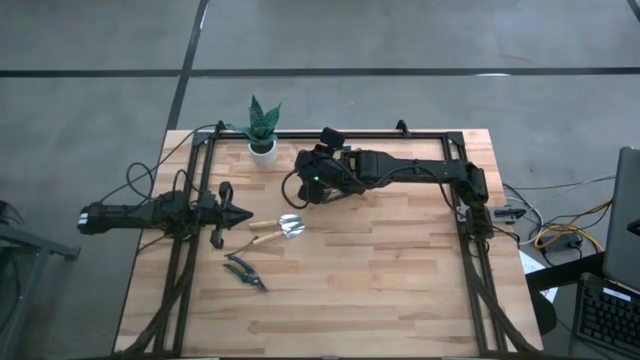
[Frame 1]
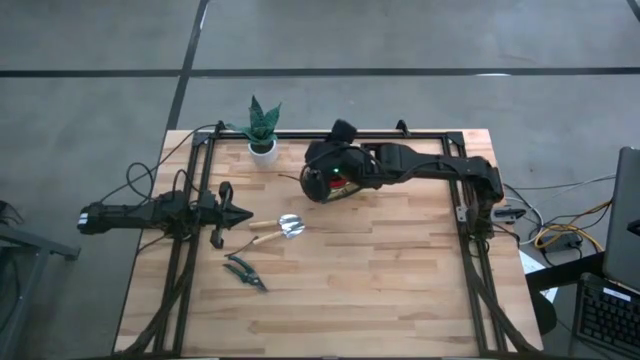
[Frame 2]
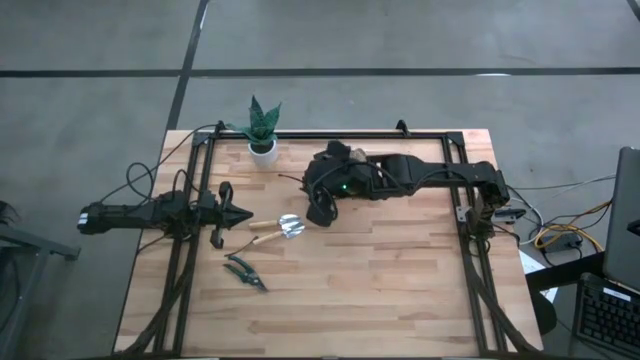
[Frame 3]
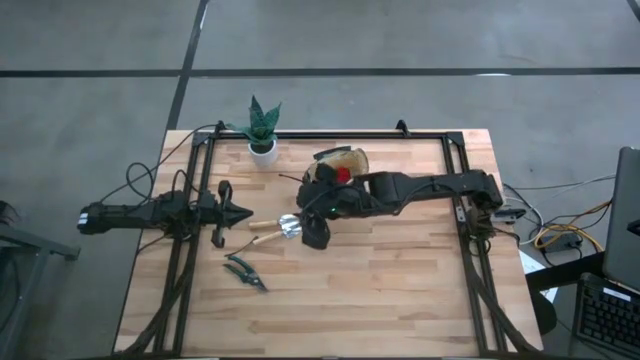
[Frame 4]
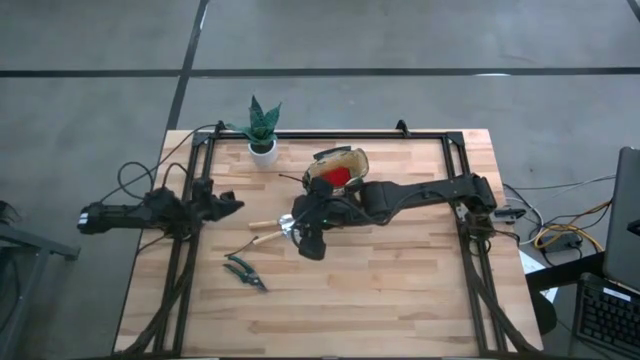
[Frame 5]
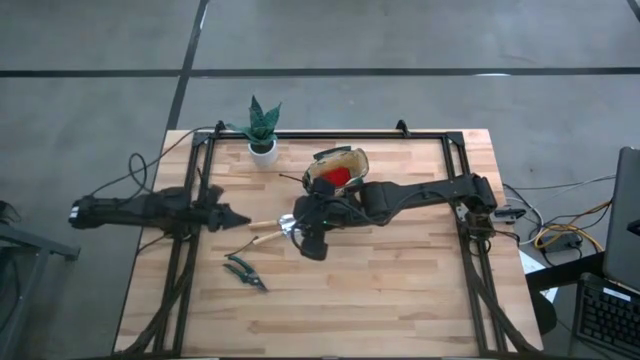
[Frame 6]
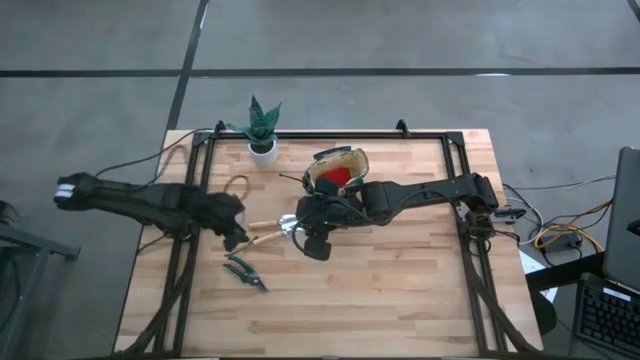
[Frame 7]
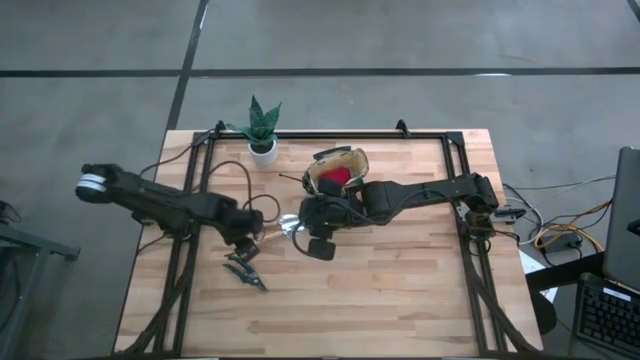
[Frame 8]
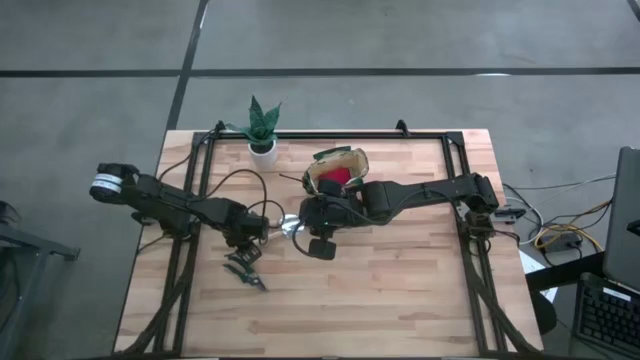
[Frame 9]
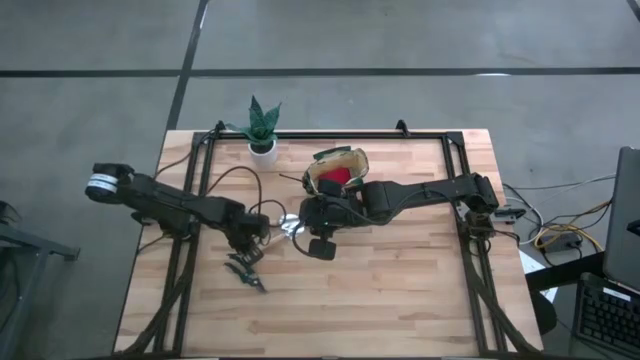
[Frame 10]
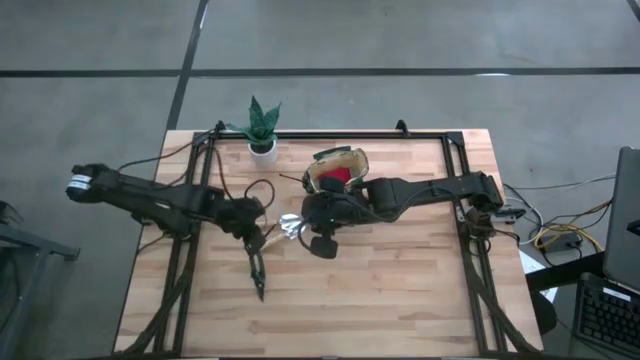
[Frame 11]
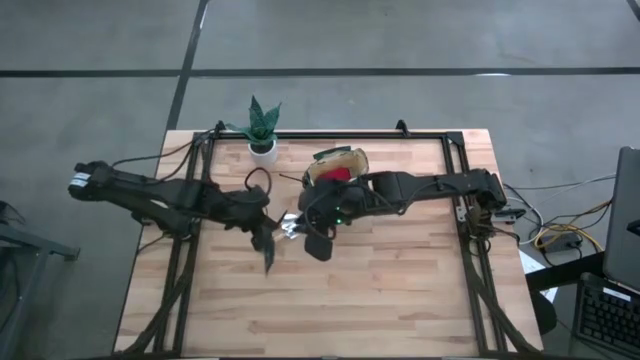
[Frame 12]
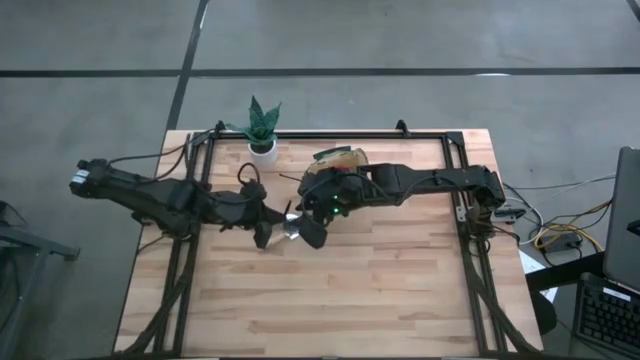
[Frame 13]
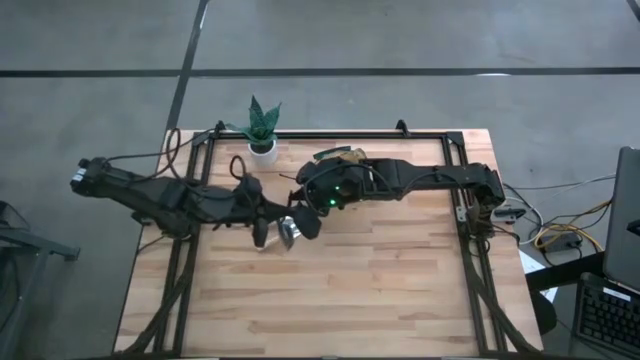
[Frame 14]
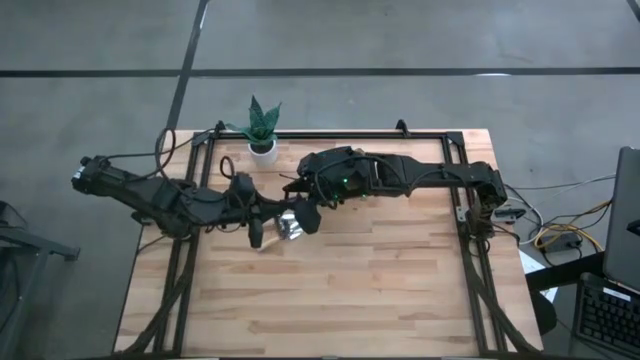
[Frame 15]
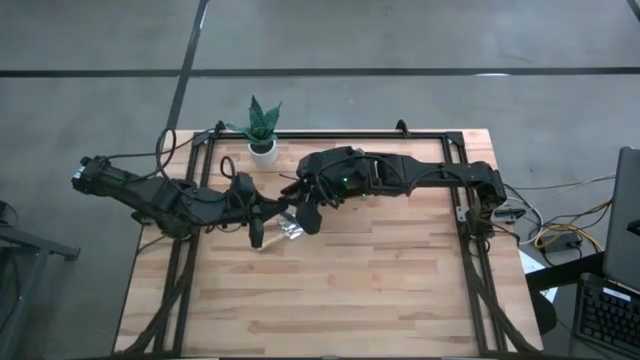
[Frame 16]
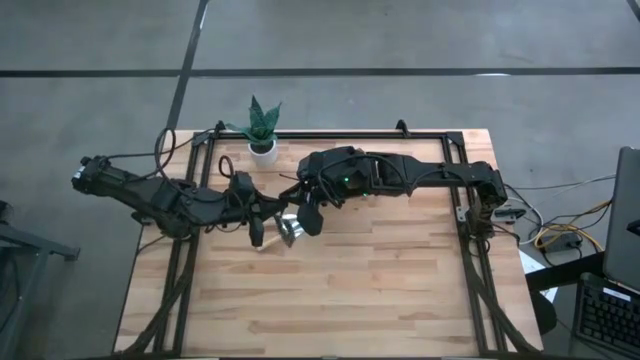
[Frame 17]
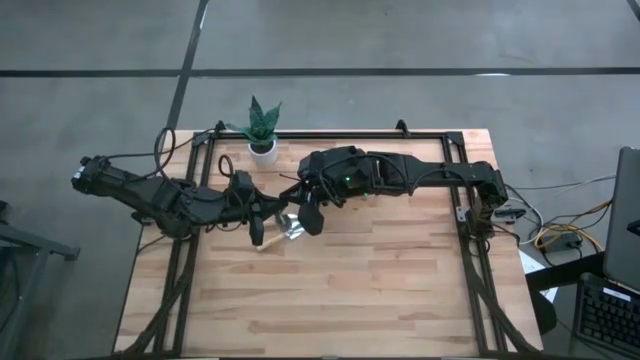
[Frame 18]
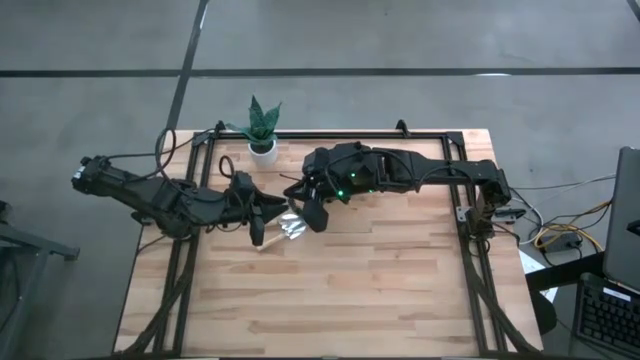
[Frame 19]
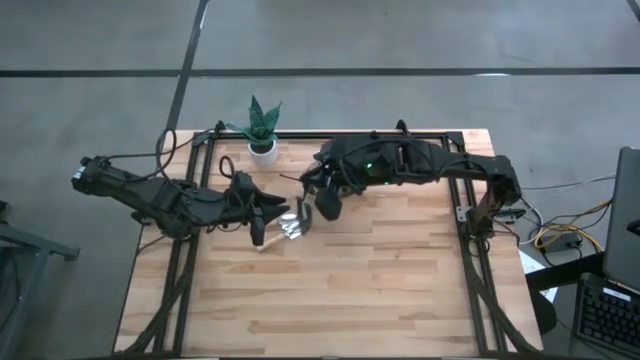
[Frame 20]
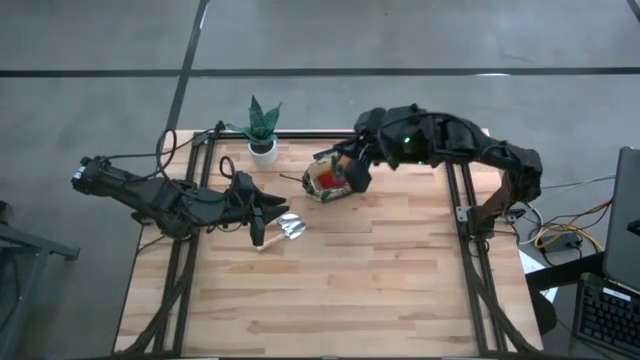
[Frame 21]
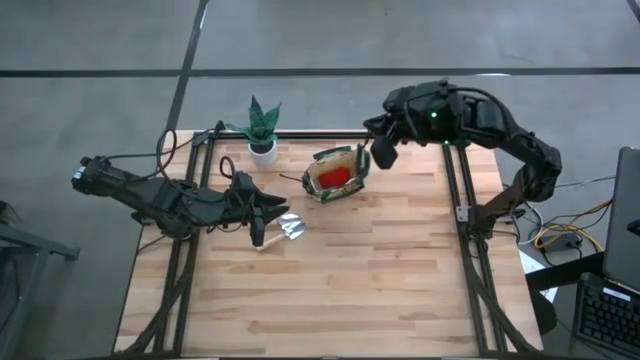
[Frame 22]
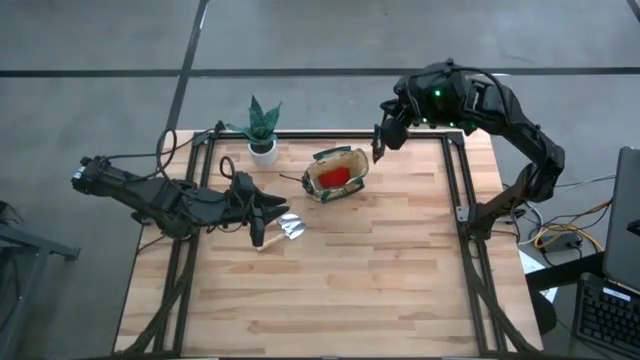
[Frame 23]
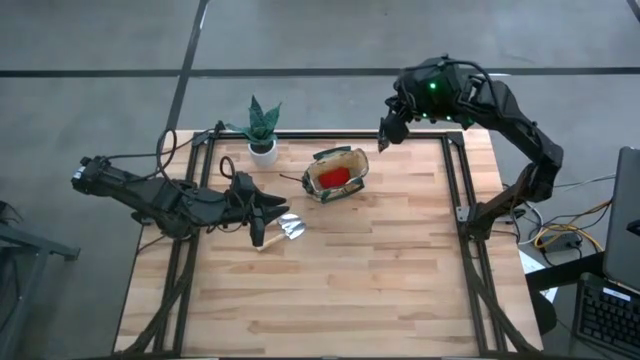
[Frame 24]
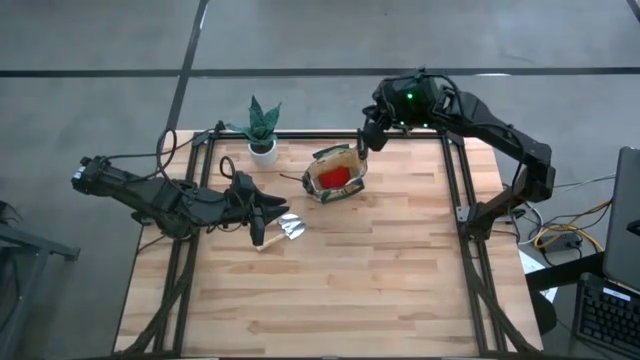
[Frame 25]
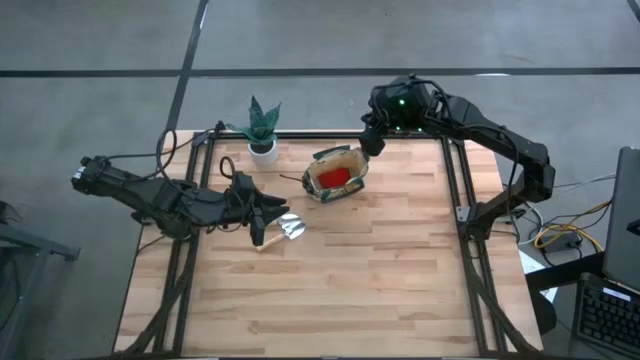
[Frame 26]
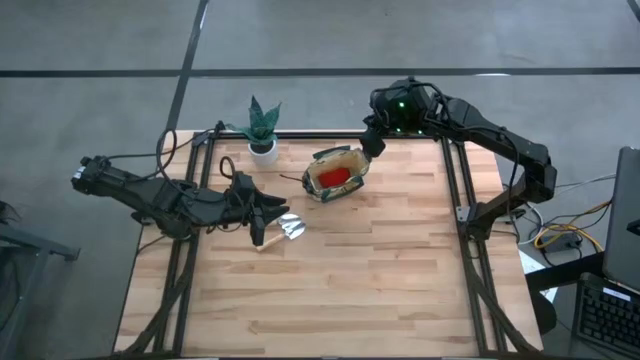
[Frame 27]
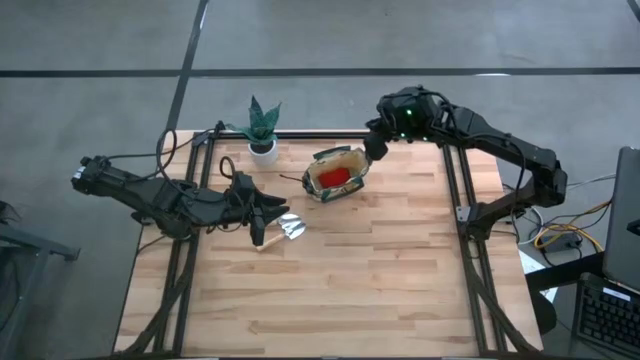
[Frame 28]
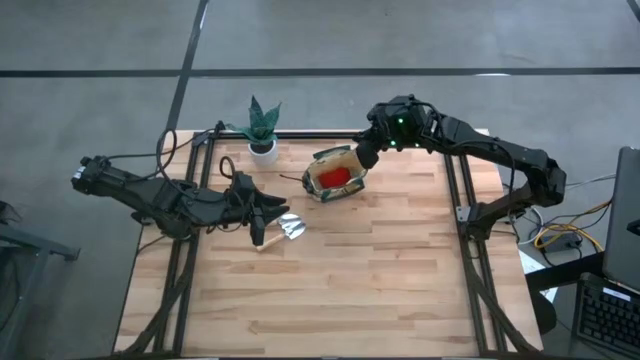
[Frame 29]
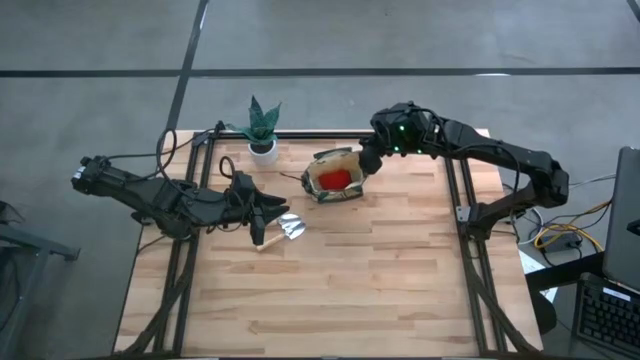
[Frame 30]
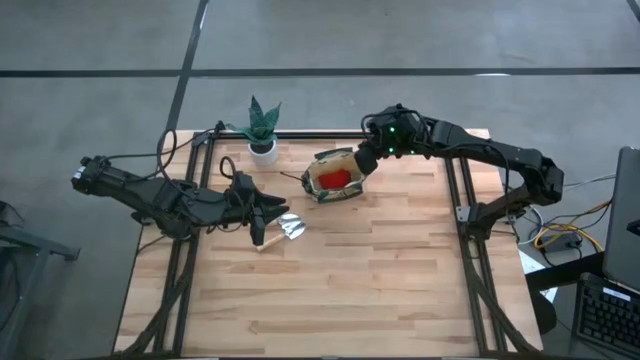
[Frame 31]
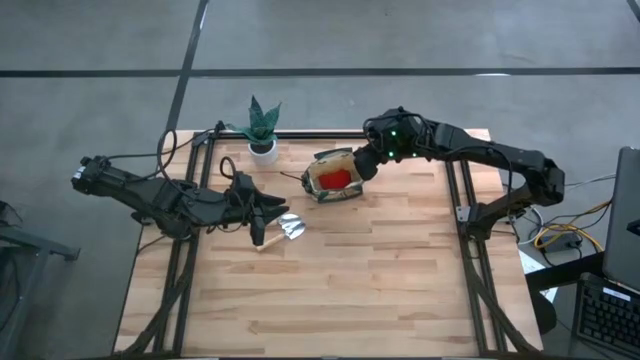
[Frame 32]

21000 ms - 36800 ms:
Task: Pick & Place Garden tools in Gardening bag
Put the shear scissors into the white bag

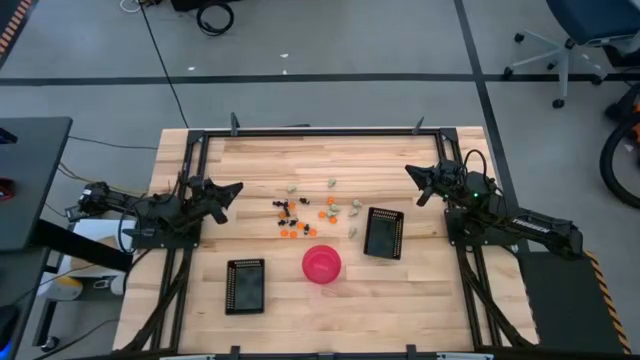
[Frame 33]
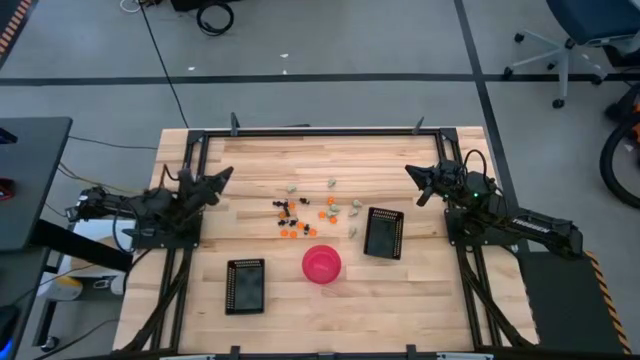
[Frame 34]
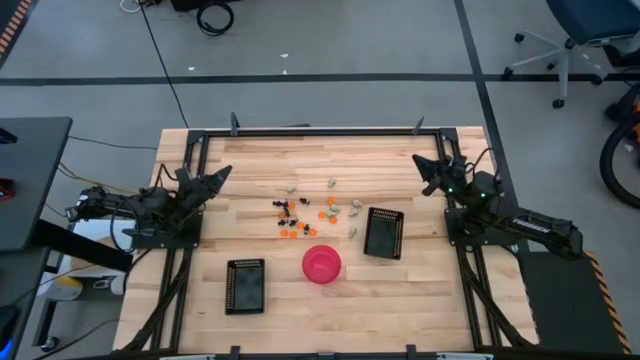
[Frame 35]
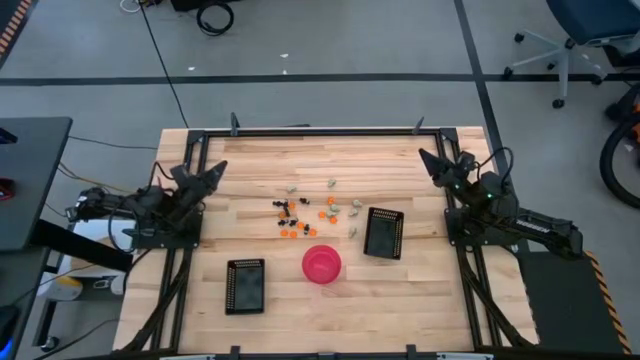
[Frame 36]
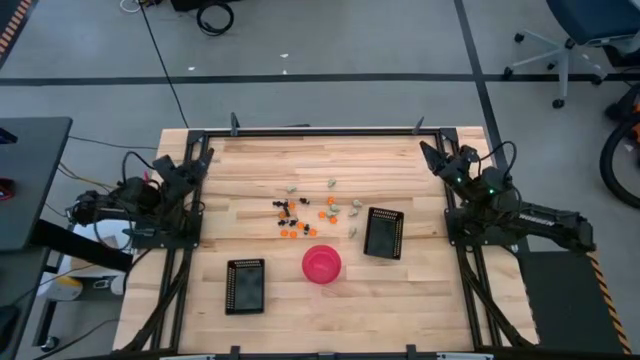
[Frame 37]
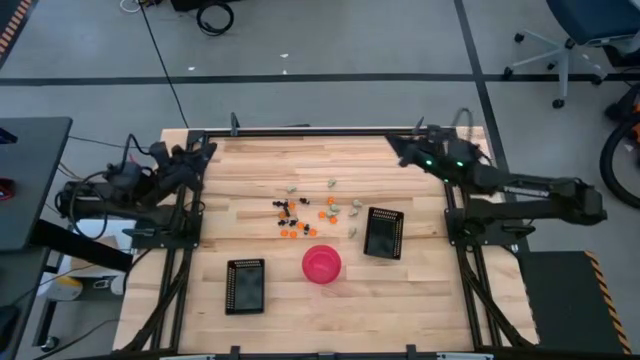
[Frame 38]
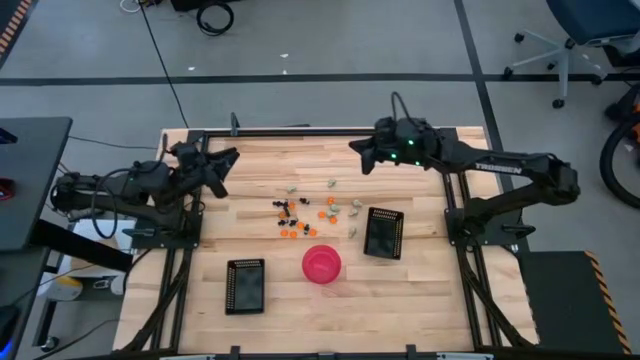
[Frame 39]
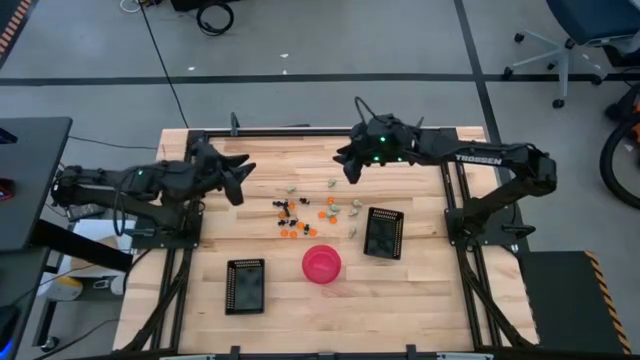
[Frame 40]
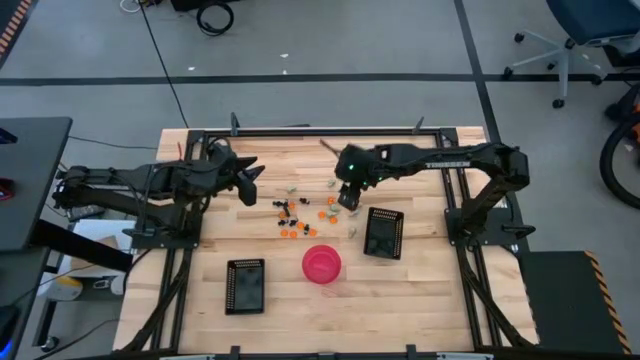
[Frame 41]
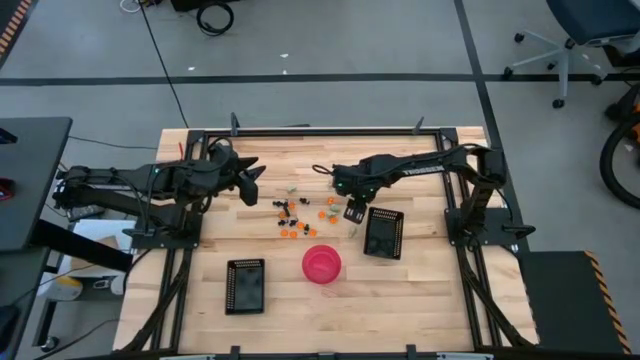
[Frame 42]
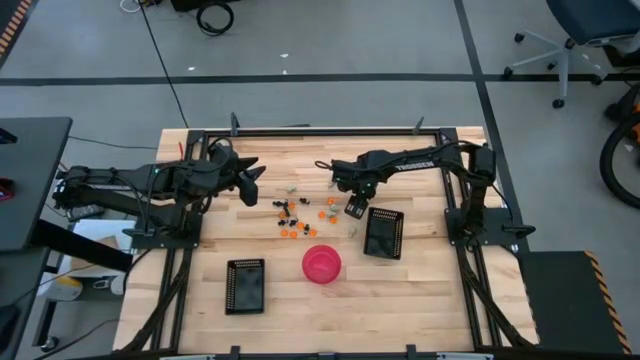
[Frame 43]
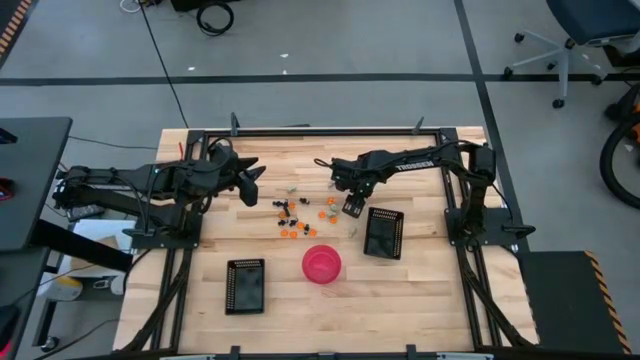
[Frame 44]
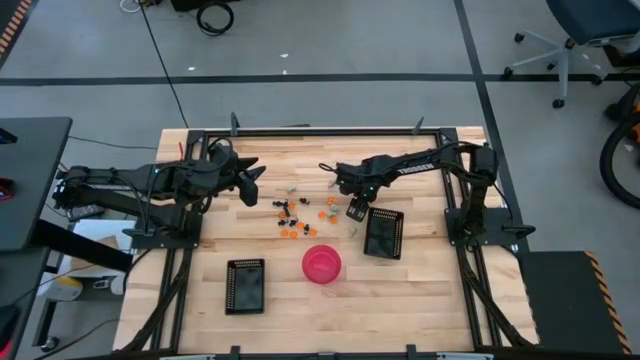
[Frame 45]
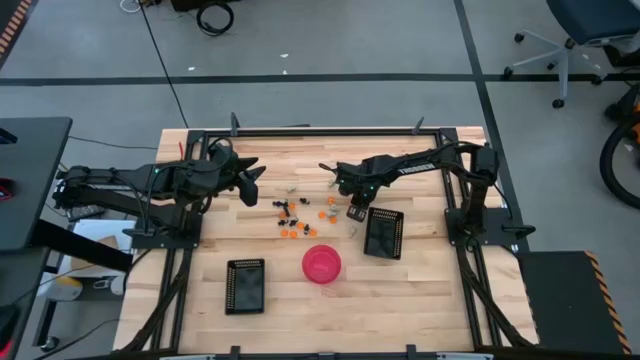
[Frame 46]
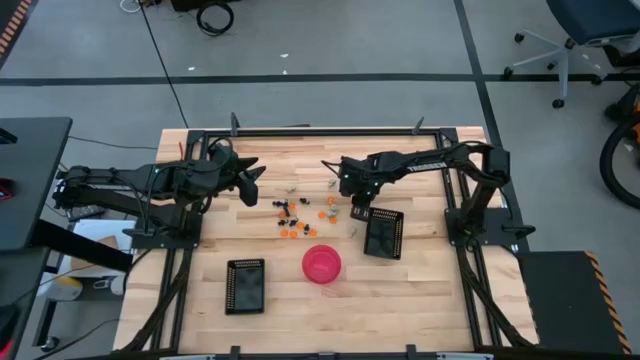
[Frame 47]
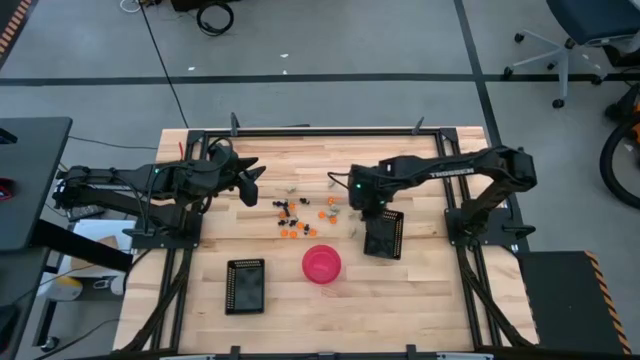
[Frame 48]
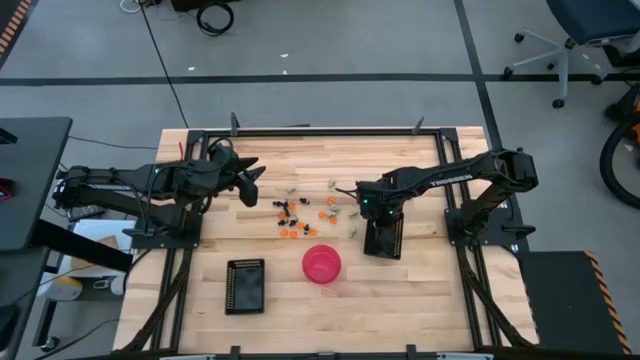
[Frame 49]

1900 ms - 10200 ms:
Task: Sort Halloween decoration
Put the white skull toy into the top black bin
